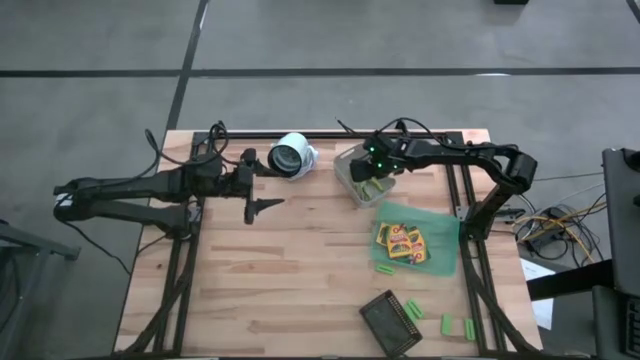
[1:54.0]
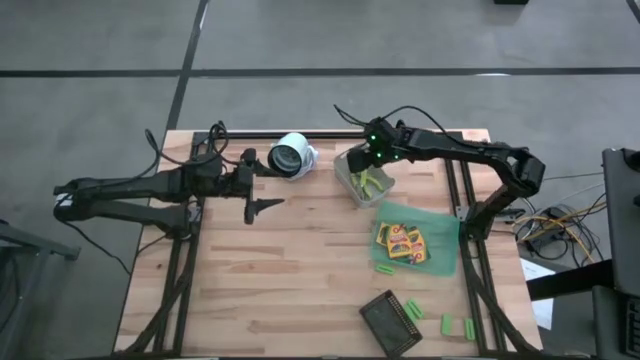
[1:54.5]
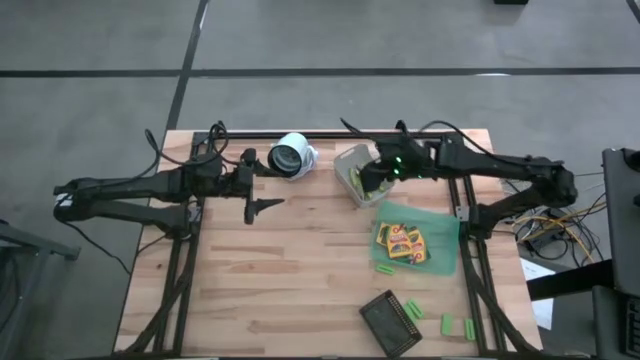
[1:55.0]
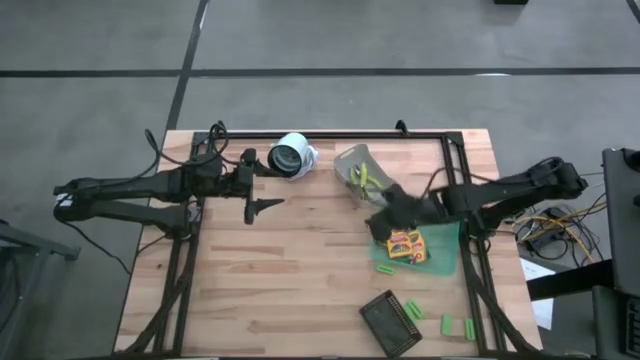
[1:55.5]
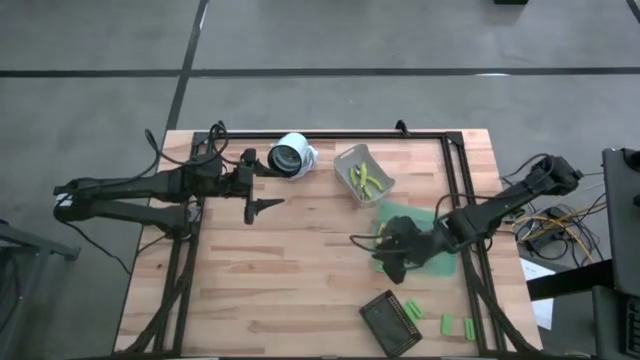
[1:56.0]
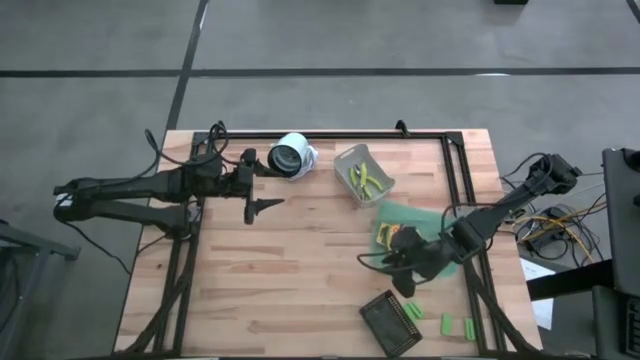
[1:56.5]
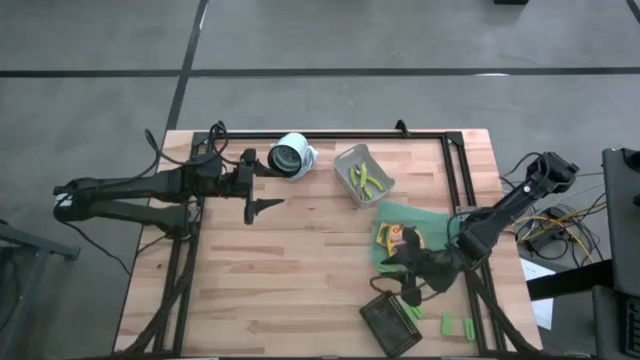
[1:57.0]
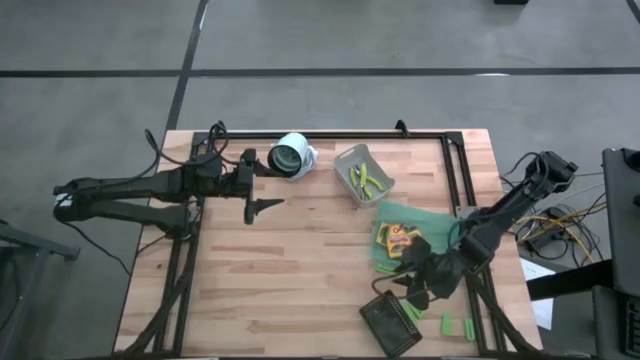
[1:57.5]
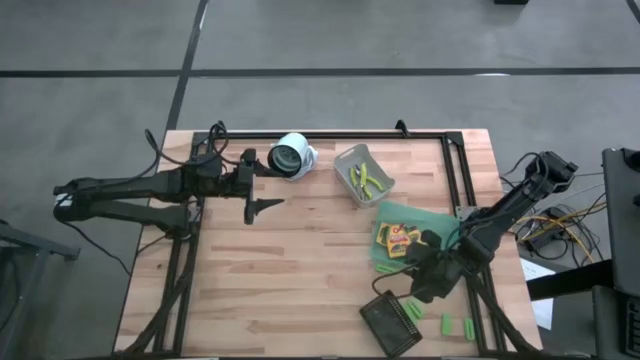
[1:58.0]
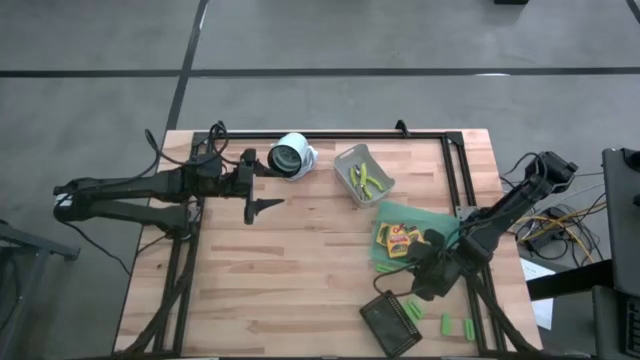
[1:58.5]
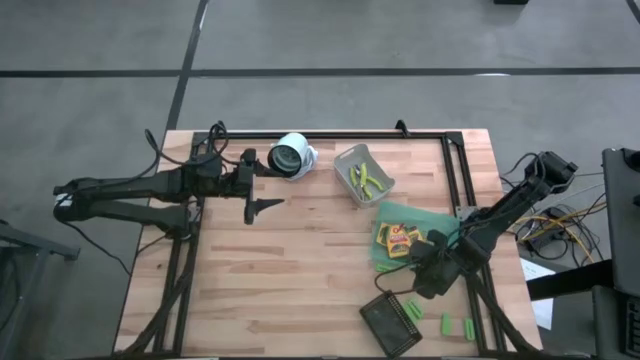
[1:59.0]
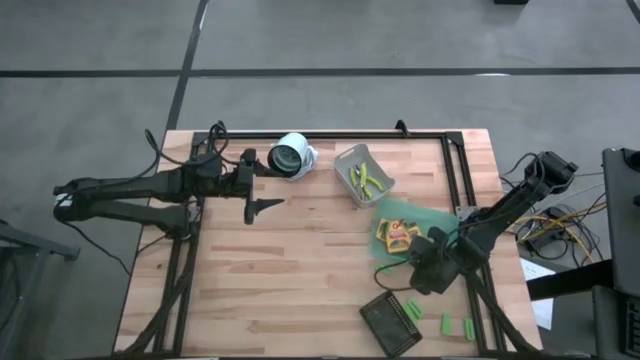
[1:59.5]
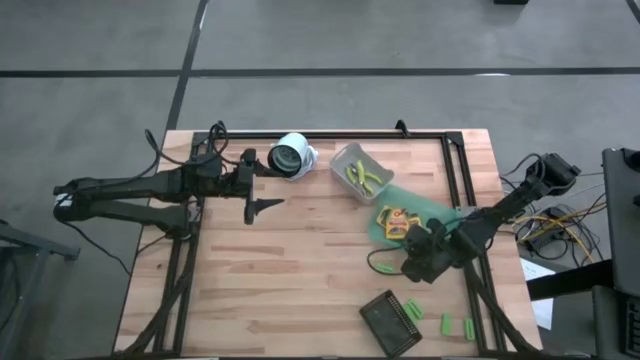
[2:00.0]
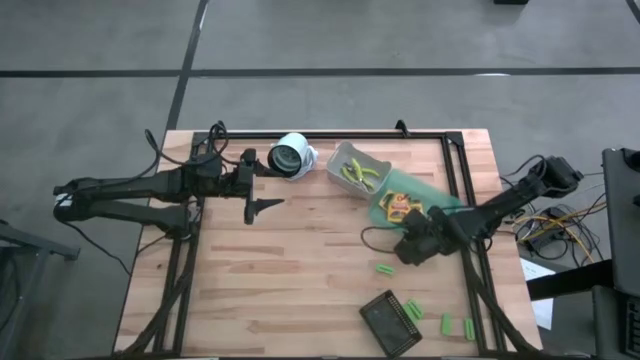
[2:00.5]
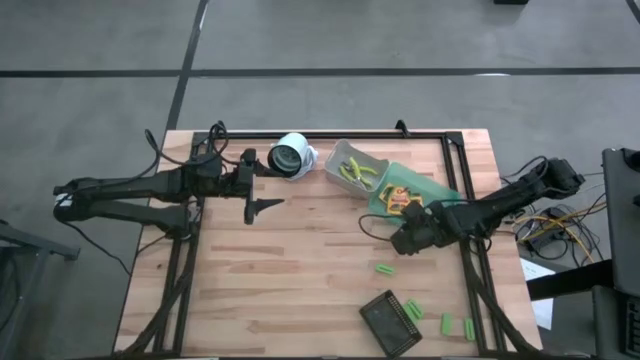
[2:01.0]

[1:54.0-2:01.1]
Task: Pick & Place School Supplies
Adjust the green bin on the table

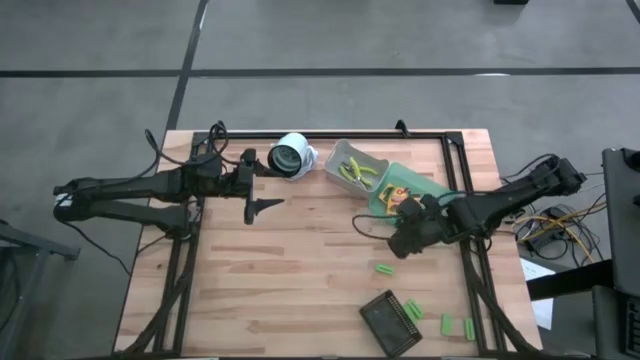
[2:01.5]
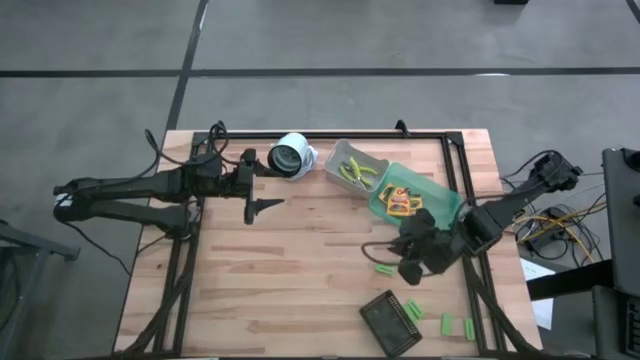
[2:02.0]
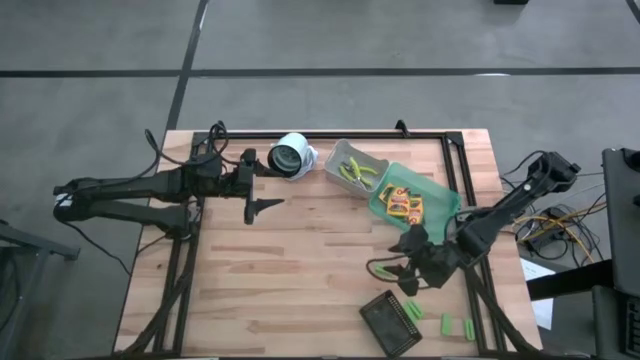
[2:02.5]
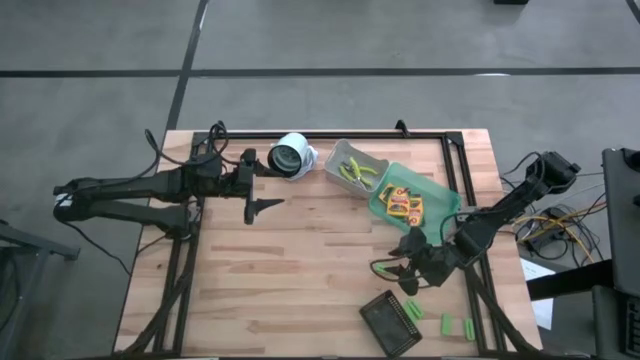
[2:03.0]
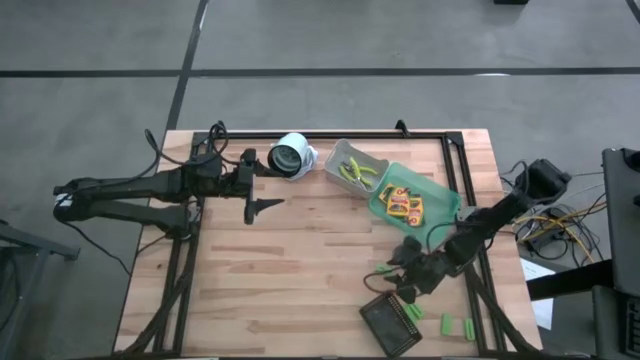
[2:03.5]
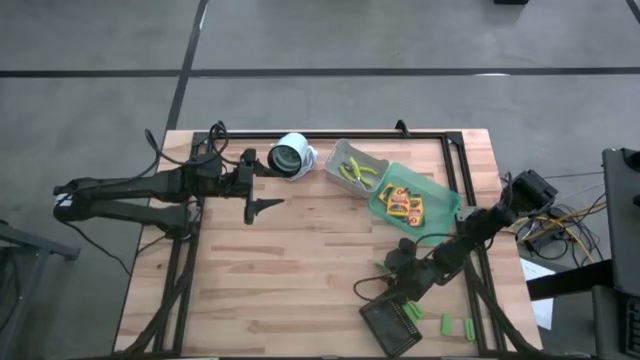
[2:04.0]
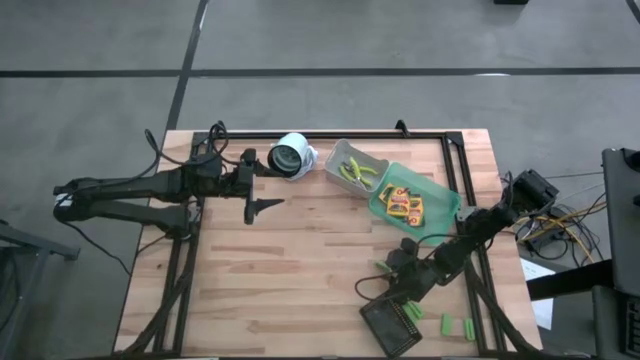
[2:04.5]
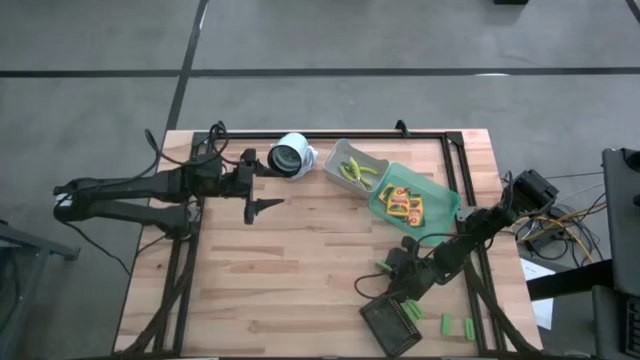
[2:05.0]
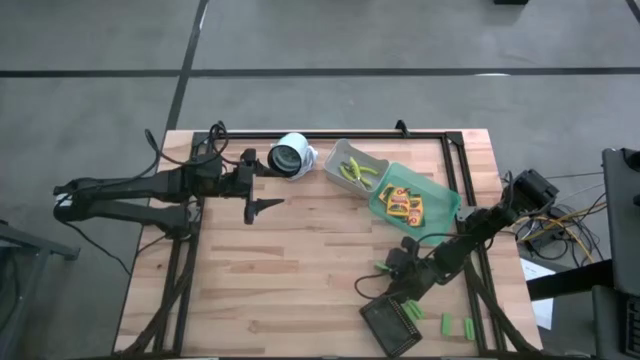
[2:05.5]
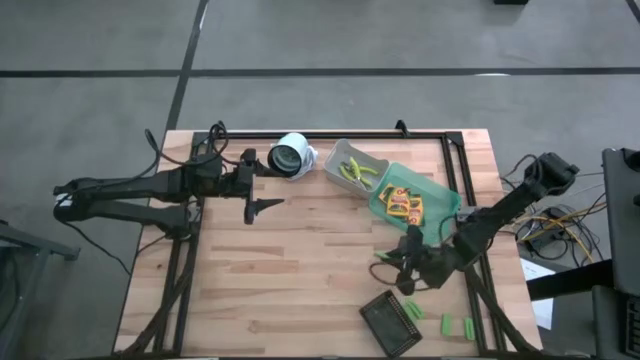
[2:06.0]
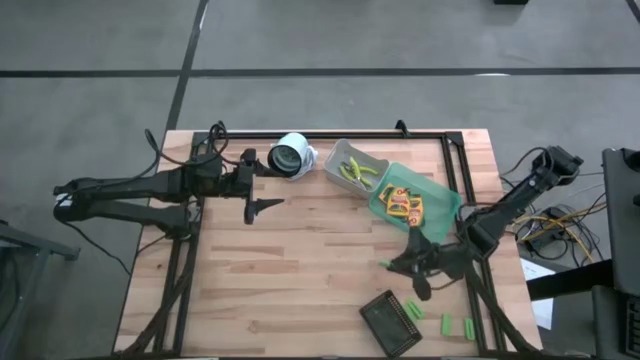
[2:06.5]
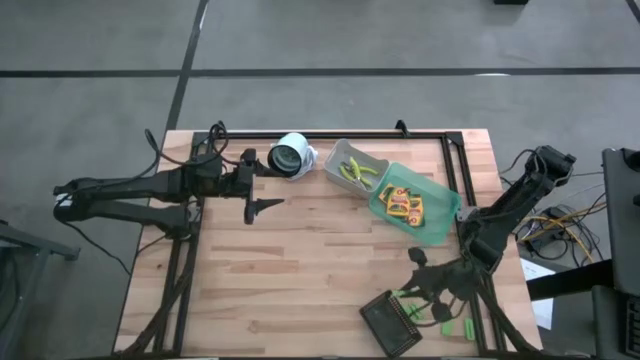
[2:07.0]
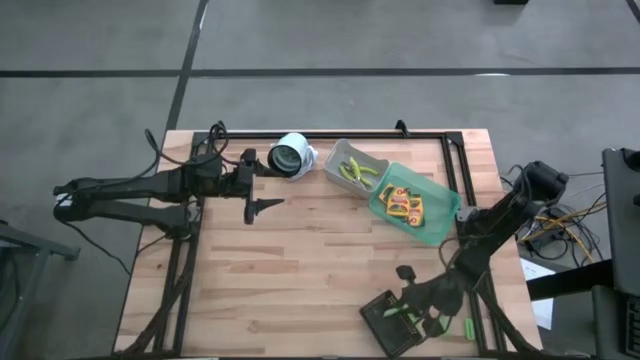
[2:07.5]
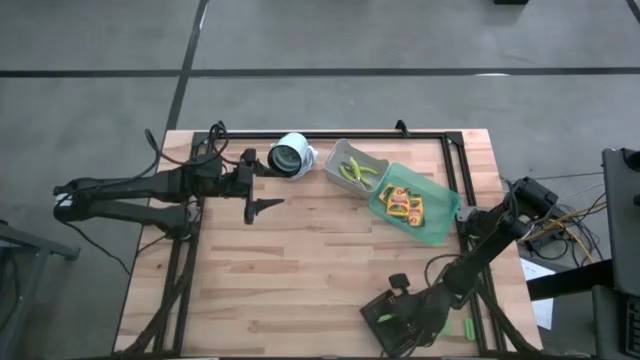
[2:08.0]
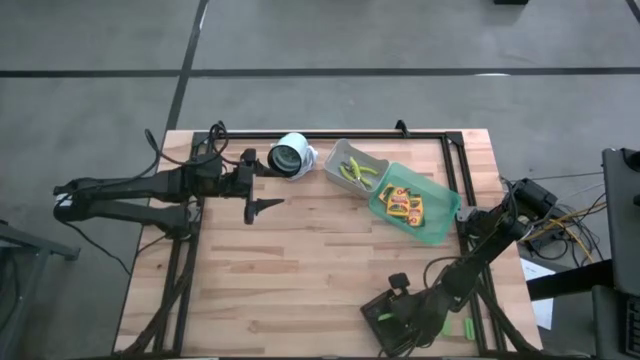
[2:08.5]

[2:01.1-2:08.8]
Put the green eraser into the black bin

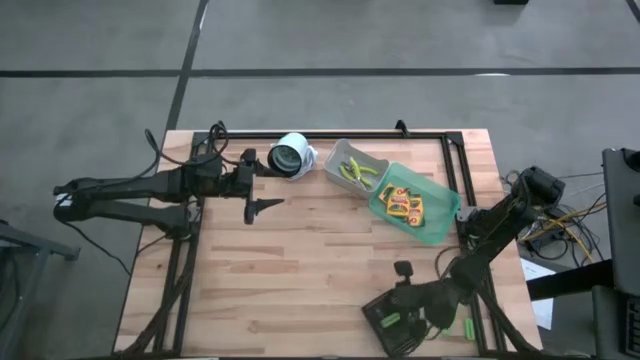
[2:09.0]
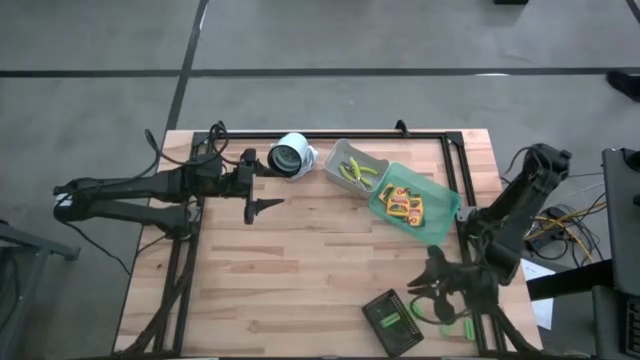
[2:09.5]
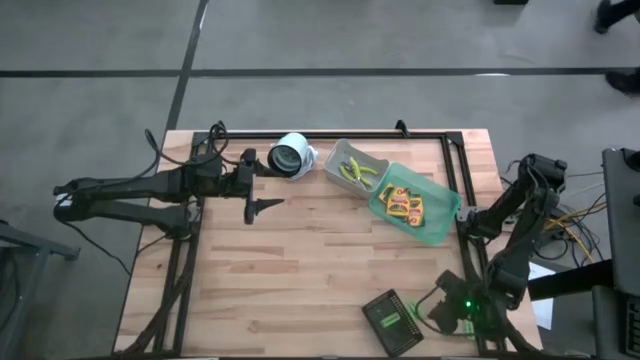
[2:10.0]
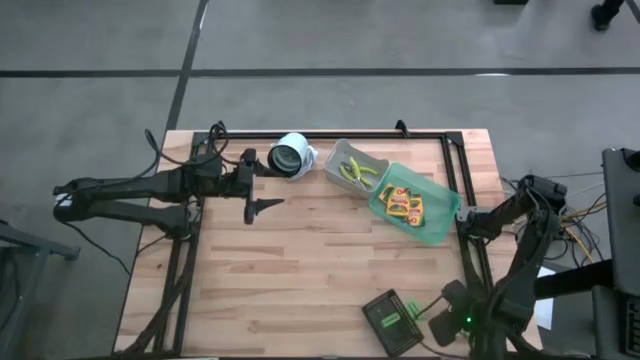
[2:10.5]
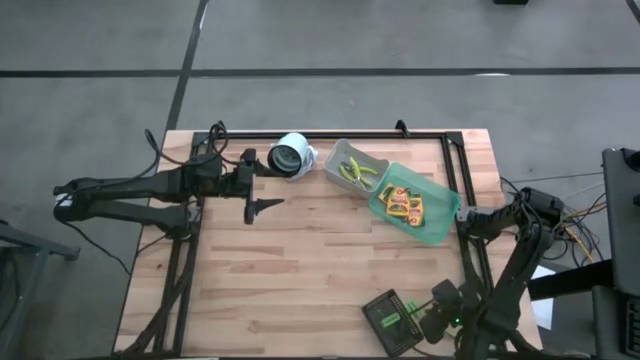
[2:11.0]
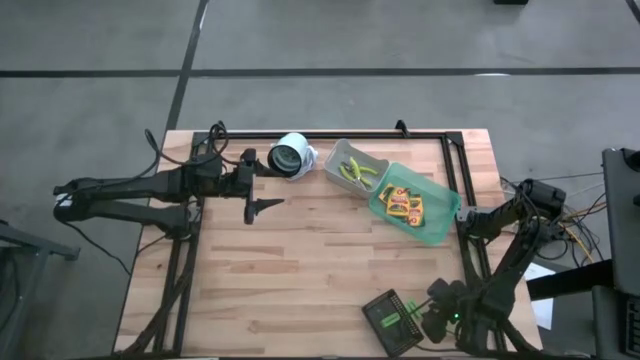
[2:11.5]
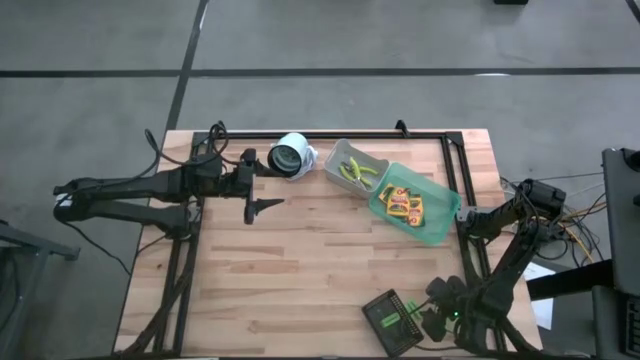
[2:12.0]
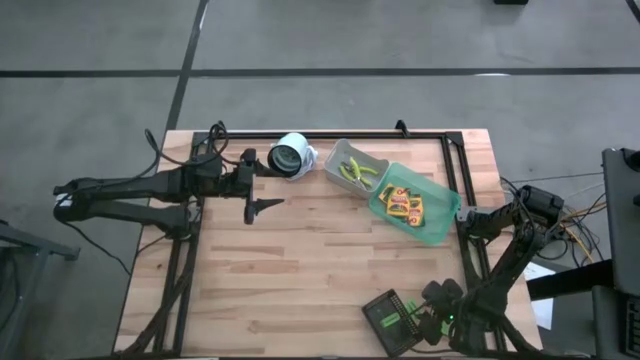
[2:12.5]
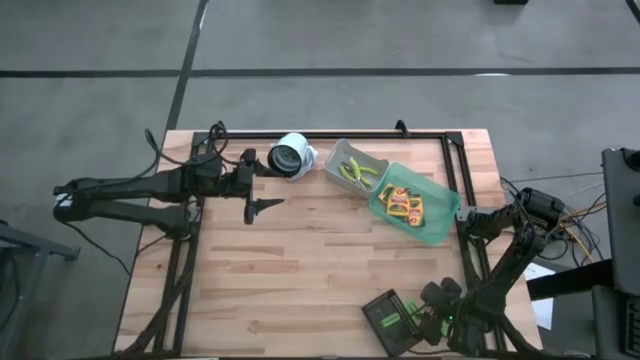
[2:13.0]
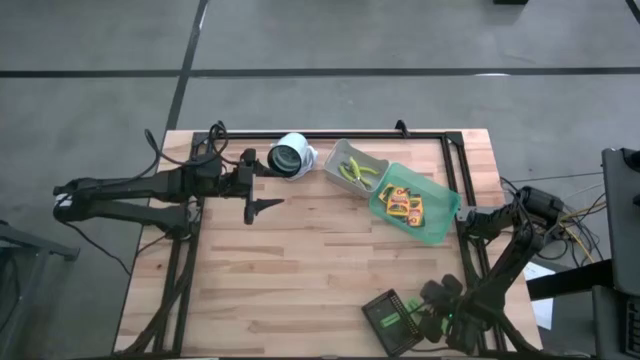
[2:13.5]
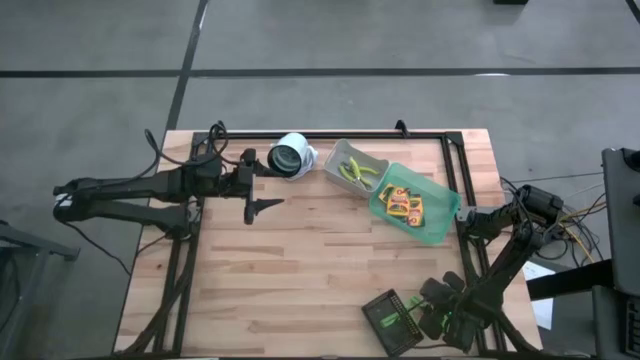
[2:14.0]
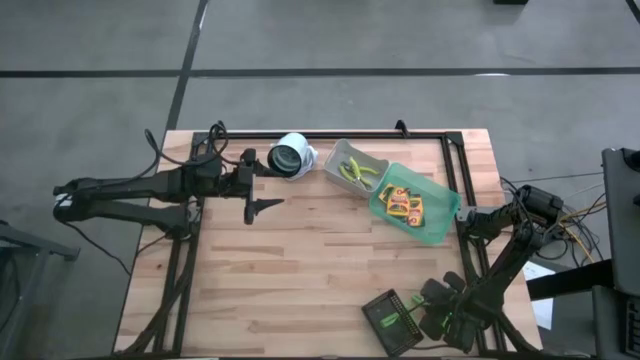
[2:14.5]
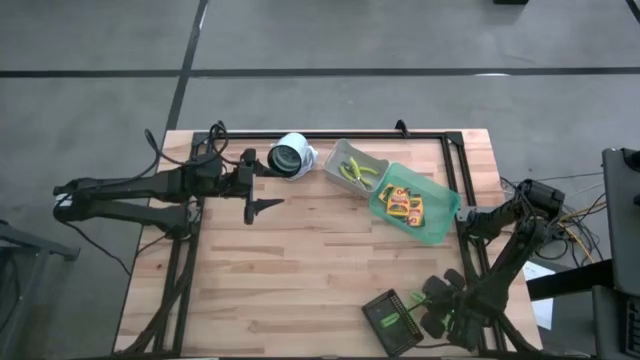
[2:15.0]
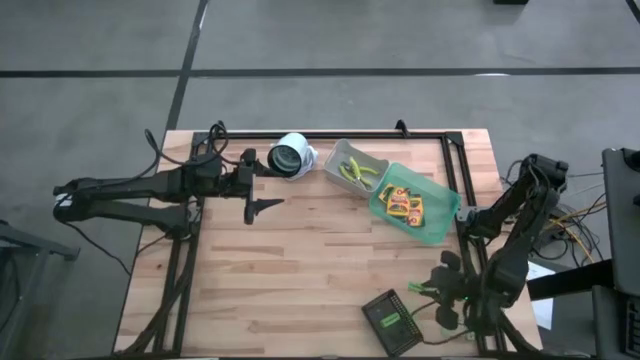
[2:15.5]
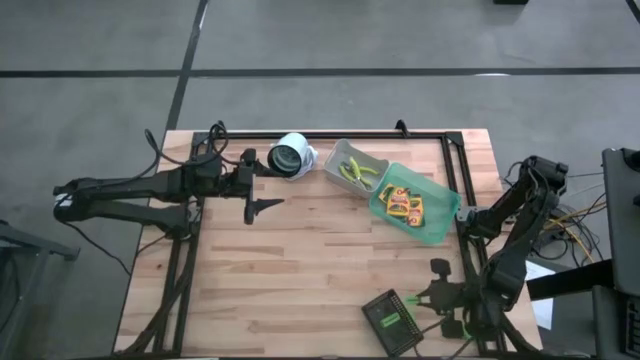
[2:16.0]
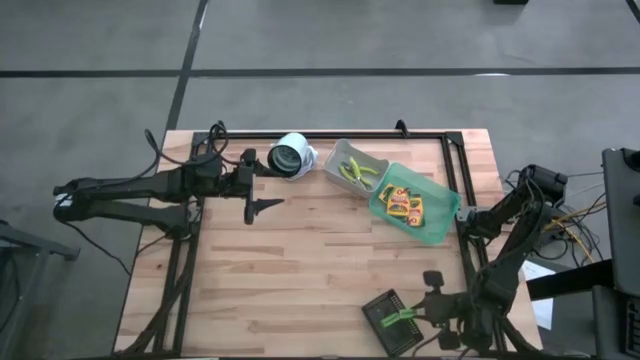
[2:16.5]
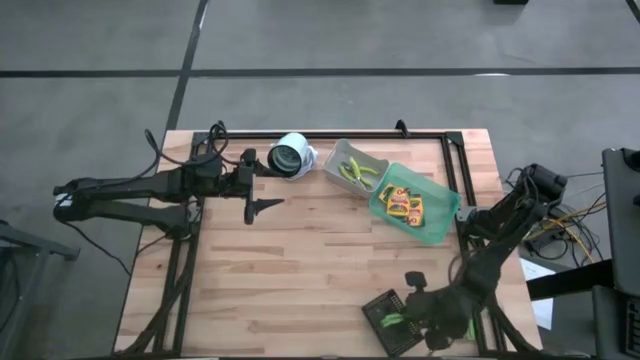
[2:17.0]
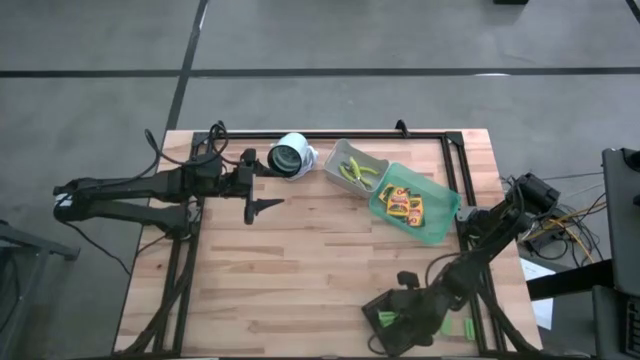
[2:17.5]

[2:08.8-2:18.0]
Put the green eraser into the black bin
